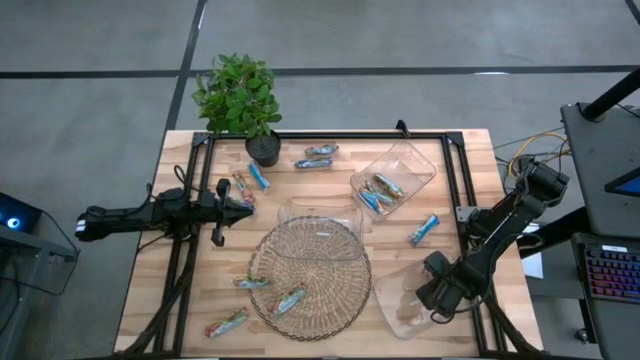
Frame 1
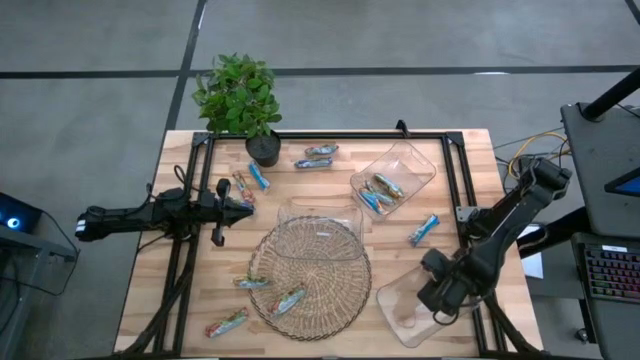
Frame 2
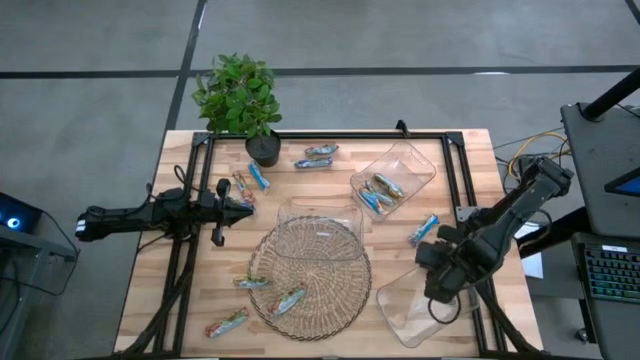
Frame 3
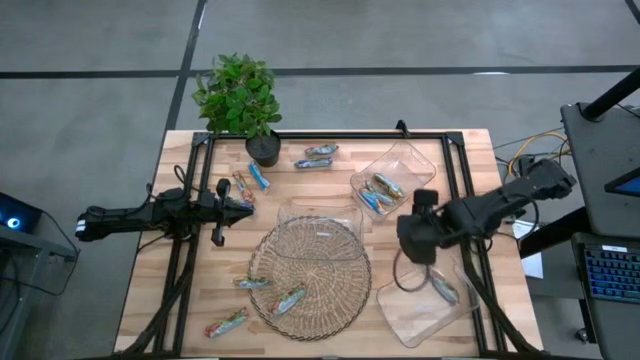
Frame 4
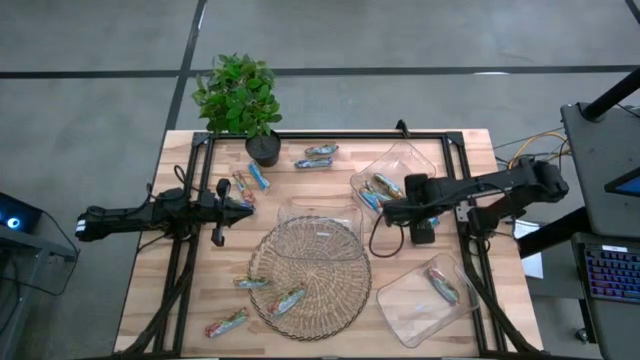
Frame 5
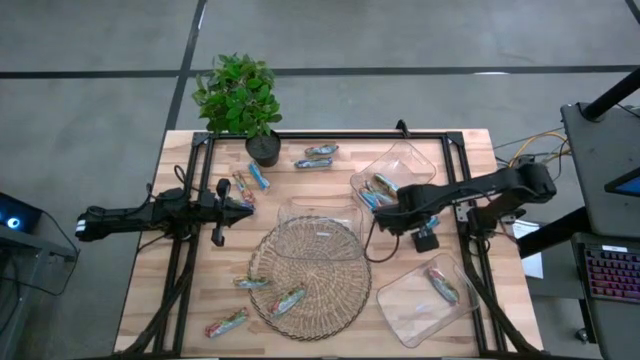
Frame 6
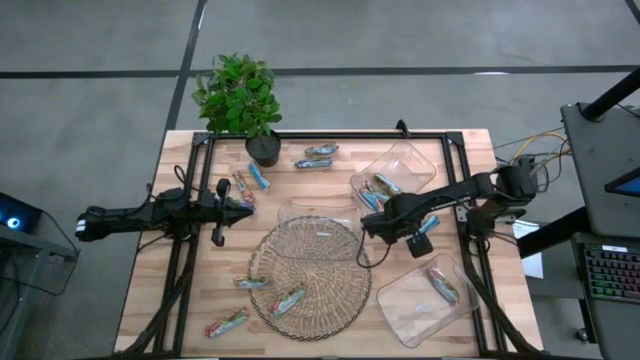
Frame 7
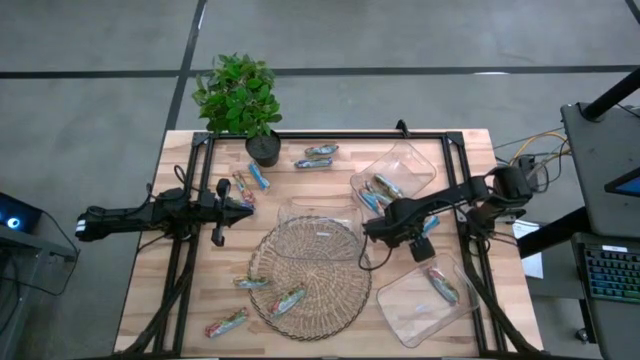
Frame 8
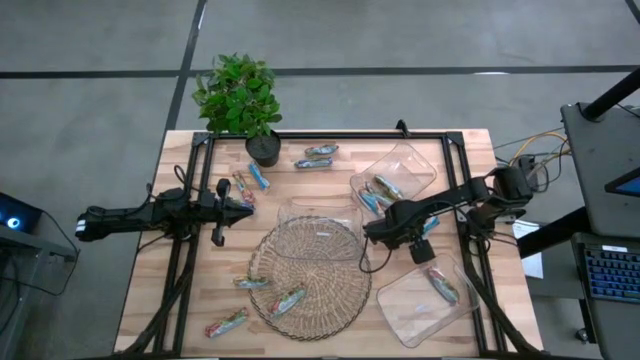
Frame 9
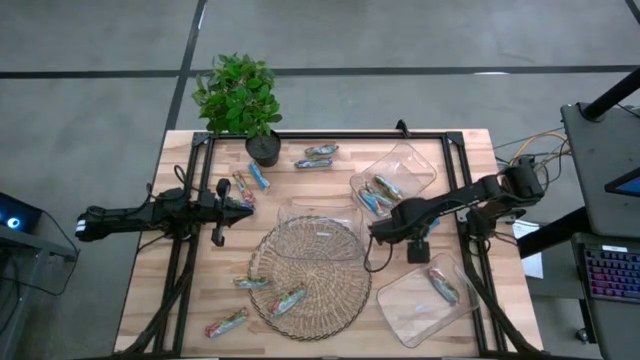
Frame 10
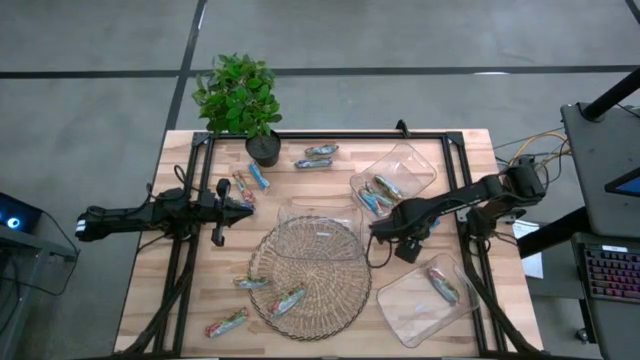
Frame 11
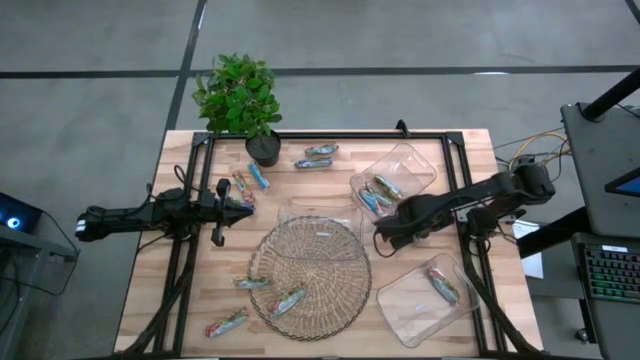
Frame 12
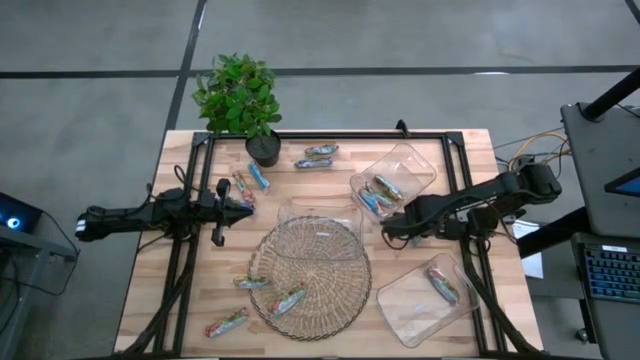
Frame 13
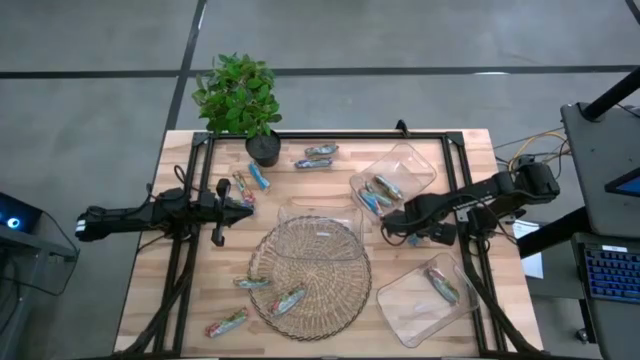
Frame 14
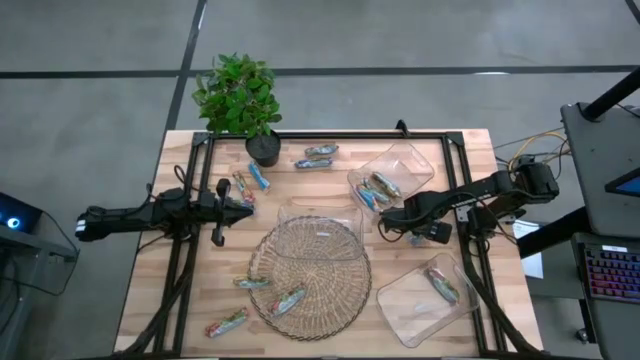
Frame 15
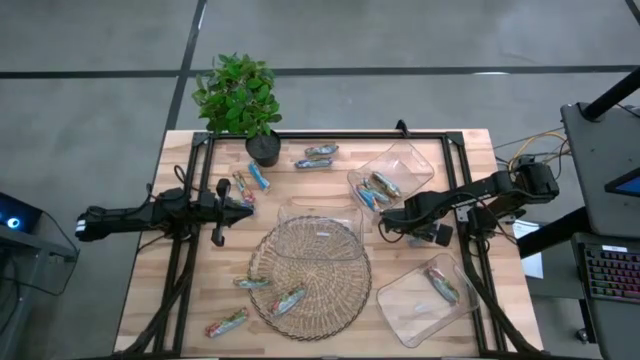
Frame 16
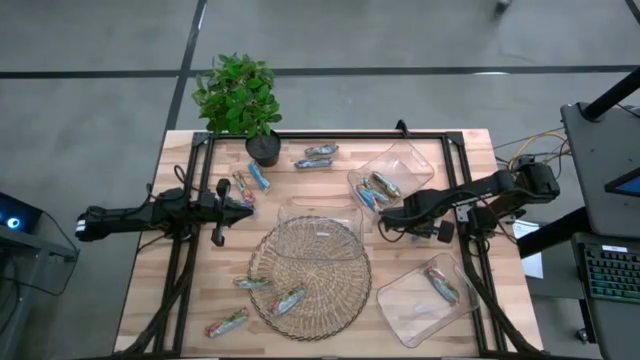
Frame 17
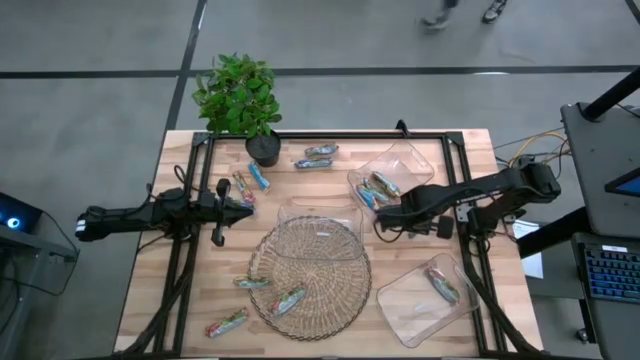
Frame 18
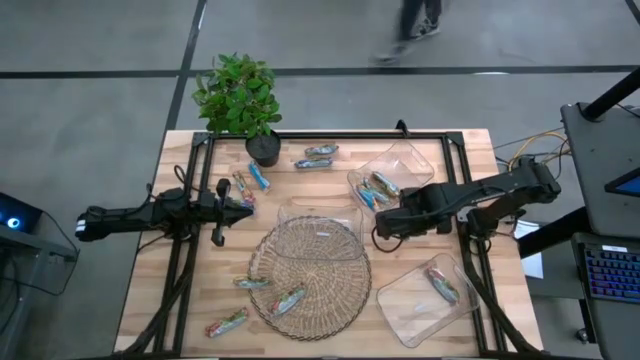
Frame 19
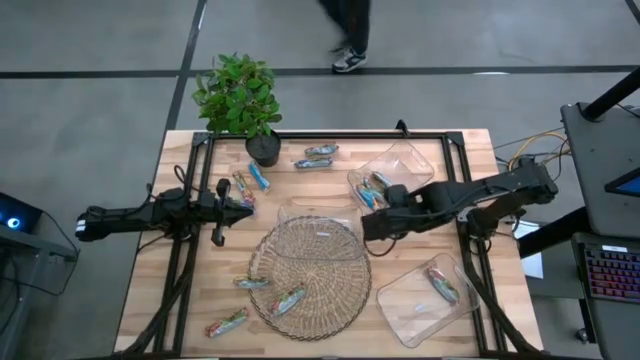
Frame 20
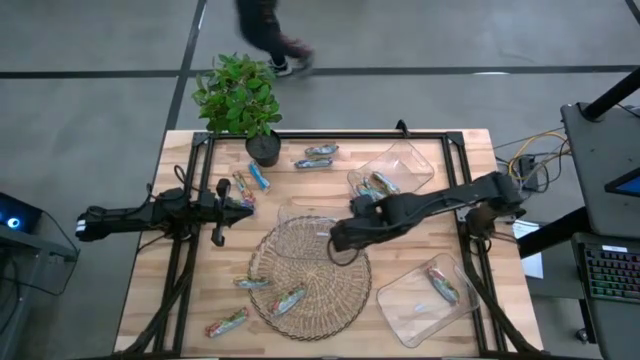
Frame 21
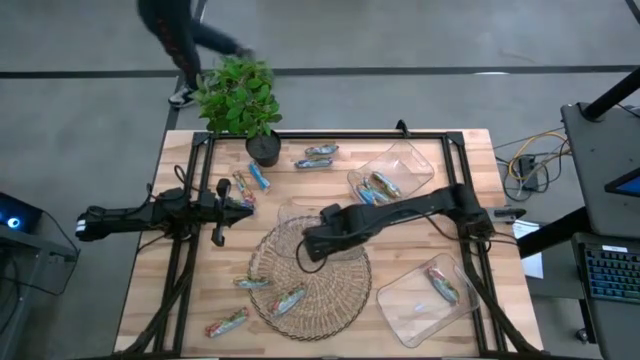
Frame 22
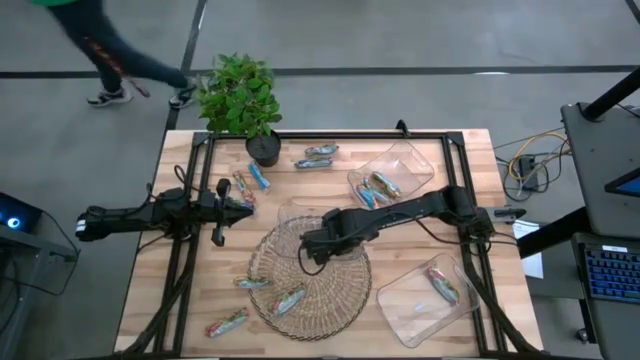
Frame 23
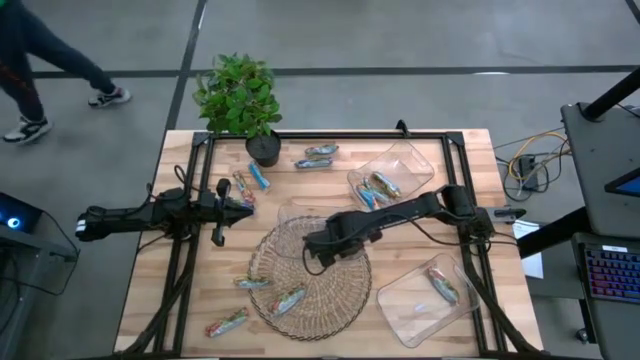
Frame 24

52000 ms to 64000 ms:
Task: Pick and place Granola Bars by type
Put the blue granola bar into the middle transparent bin

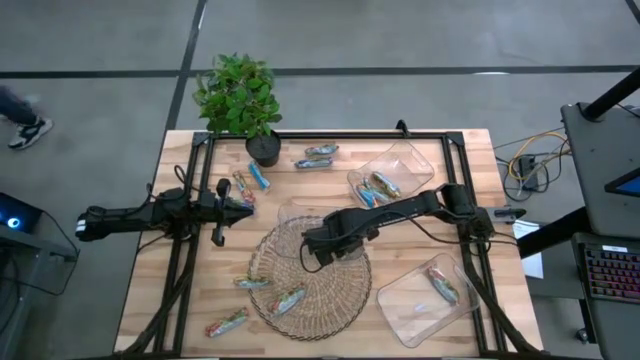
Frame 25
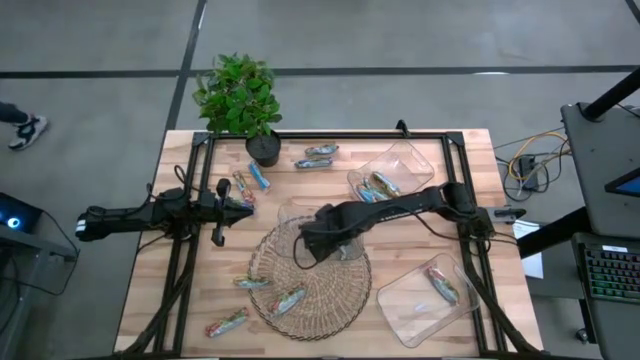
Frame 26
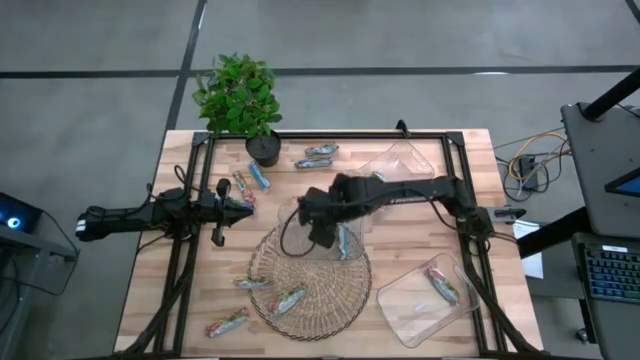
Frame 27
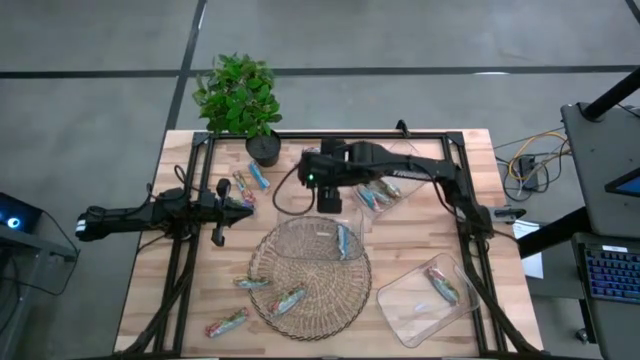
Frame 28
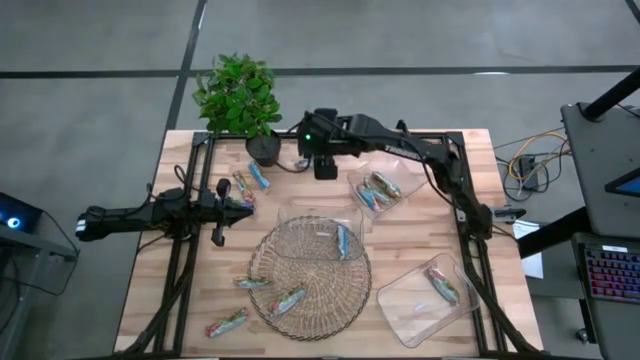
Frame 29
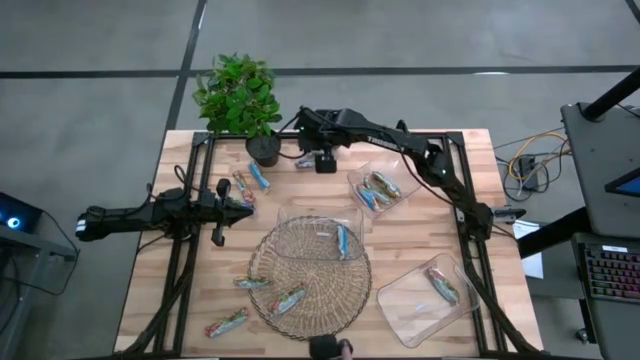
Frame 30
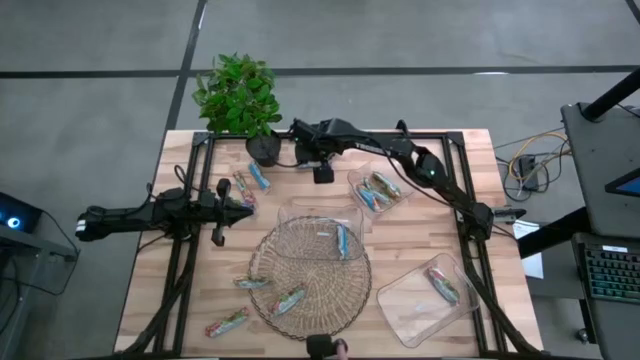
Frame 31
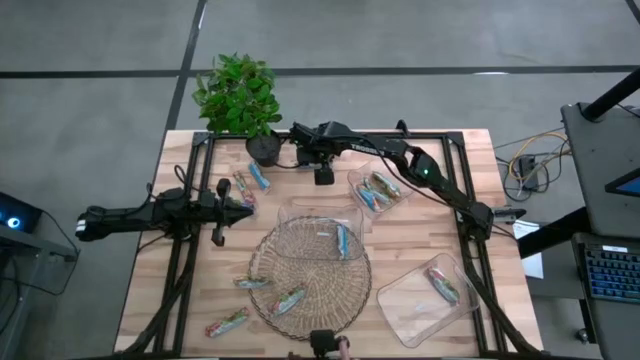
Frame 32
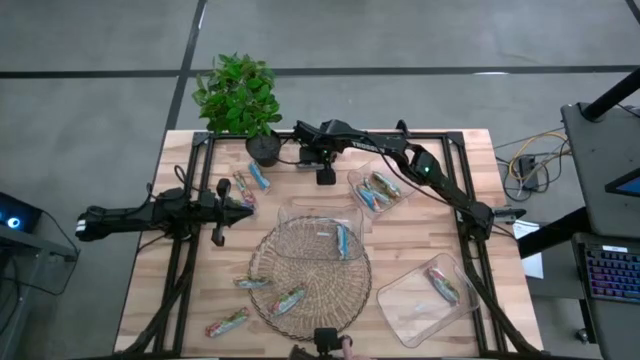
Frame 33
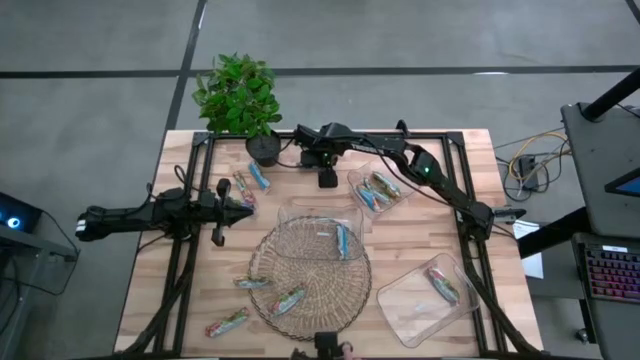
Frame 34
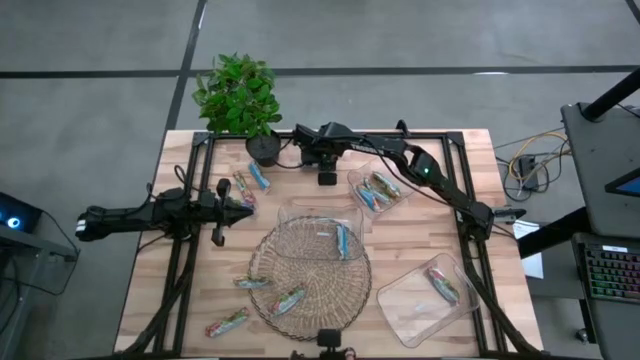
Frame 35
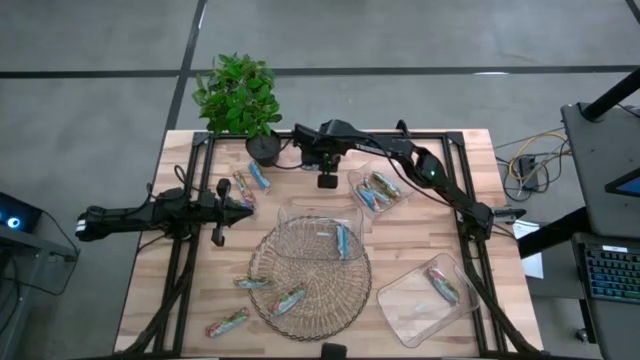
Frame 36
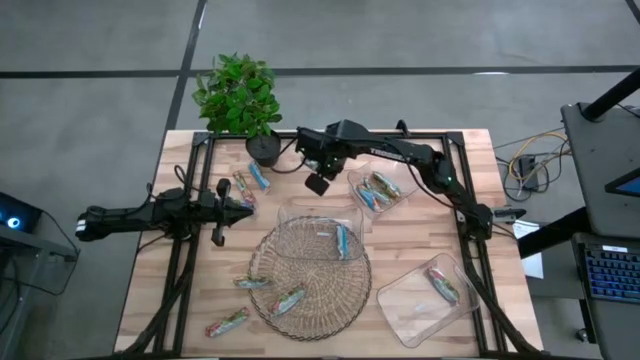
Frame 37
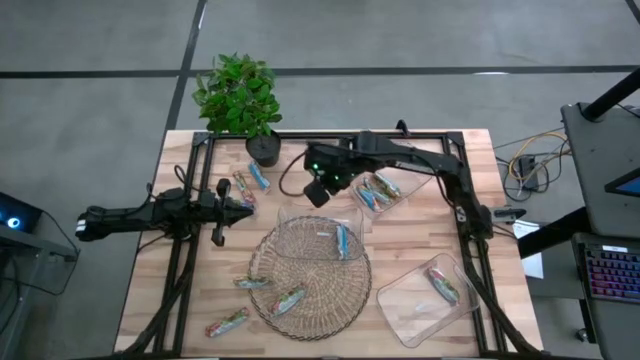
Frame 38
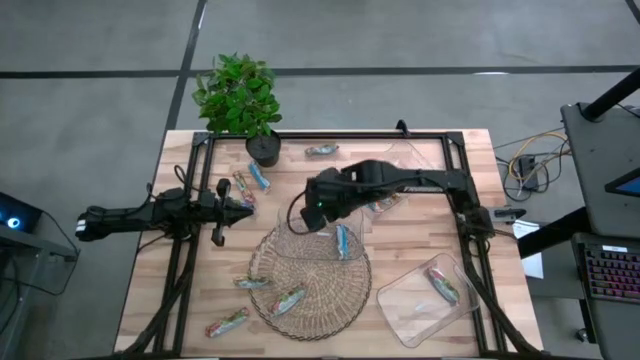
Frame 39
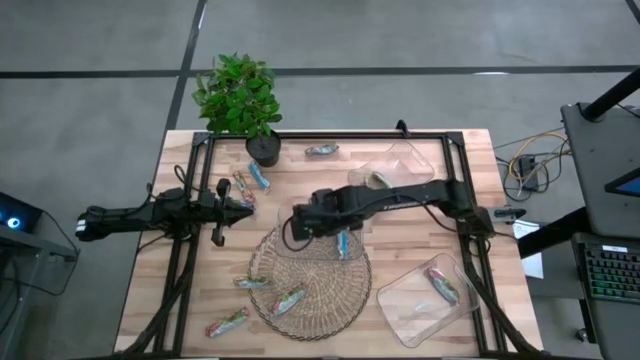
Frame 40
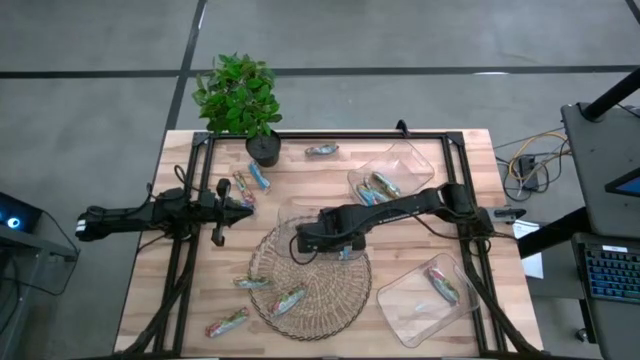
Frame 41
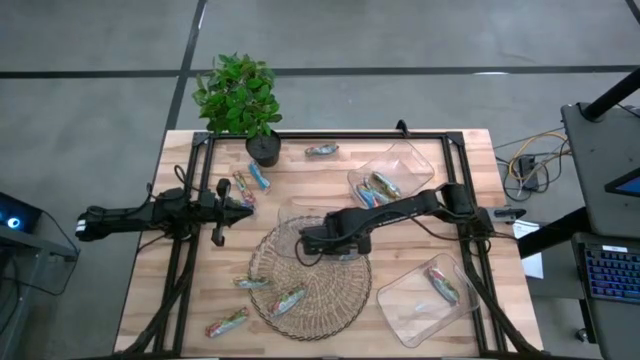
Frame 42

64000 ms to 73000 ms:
Put the blue granola bar into the middle transparent bin

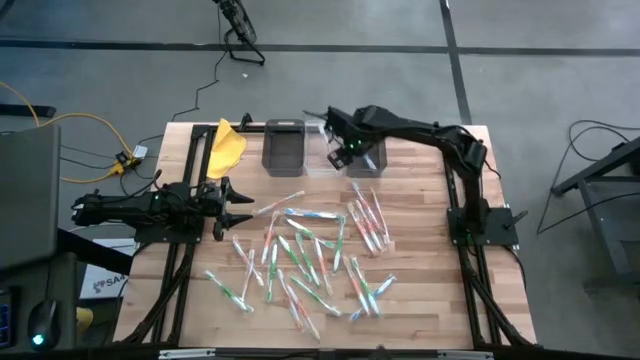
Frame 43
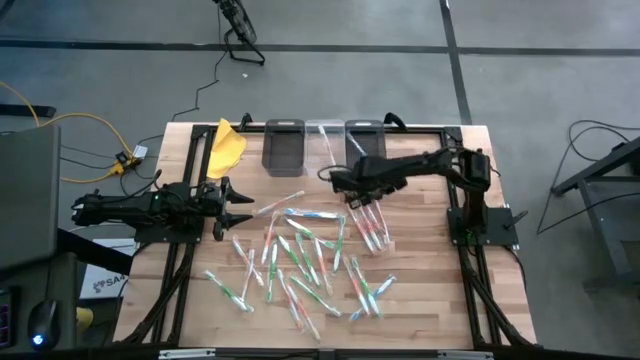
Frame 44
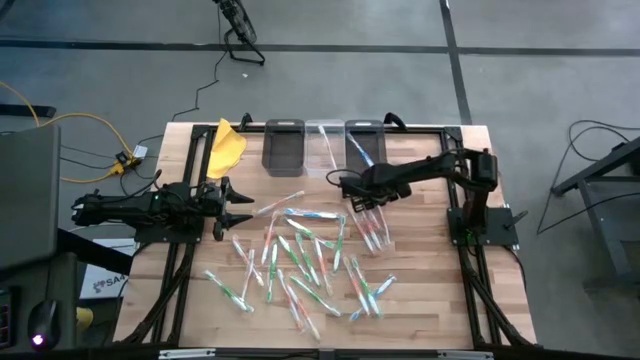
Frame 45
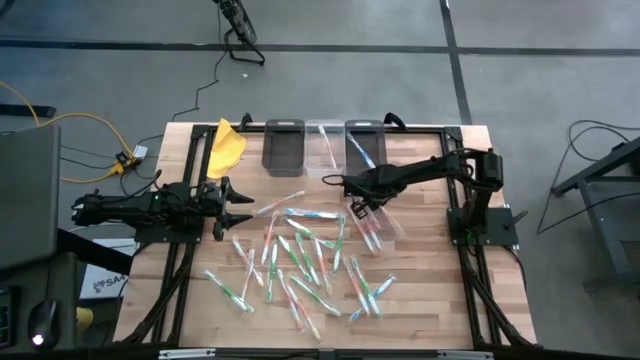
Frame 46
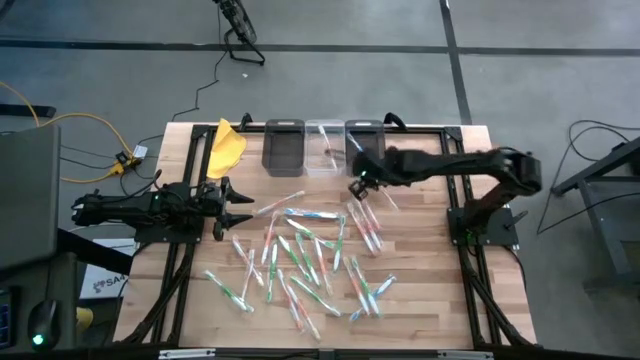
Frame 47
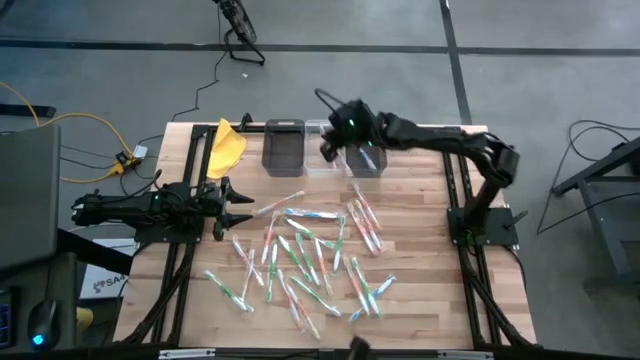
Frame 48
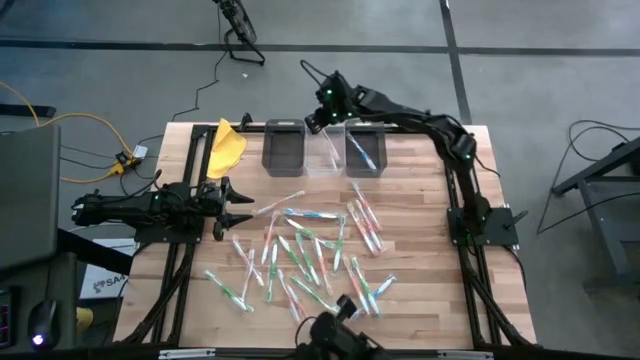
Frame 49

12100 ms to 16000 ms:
Task: Pick & Place Toothbrushes
Put the orange toothbrush into the transparent bin
